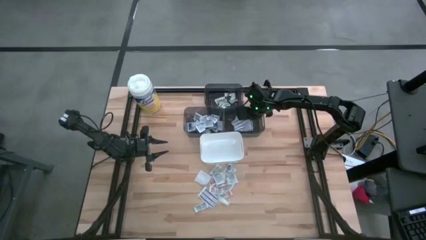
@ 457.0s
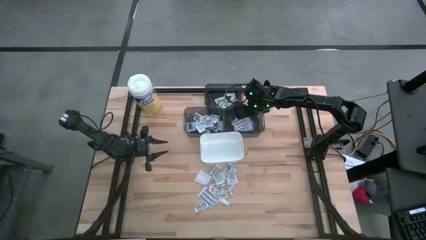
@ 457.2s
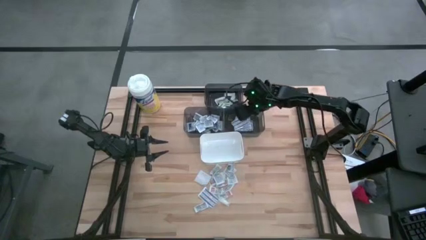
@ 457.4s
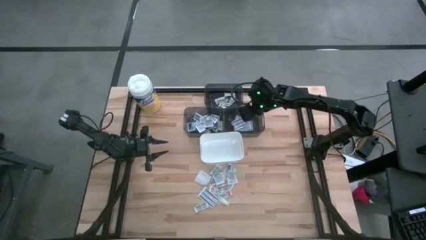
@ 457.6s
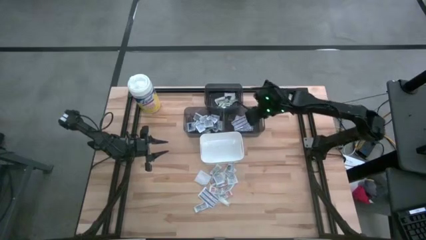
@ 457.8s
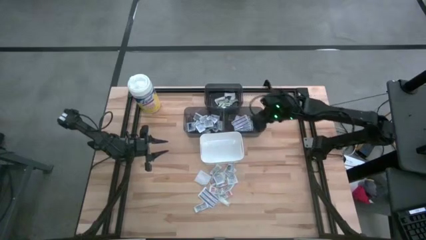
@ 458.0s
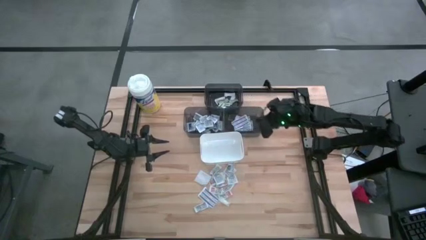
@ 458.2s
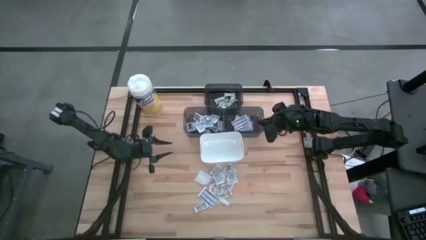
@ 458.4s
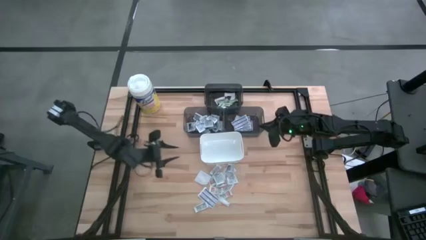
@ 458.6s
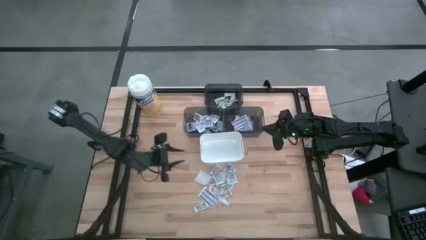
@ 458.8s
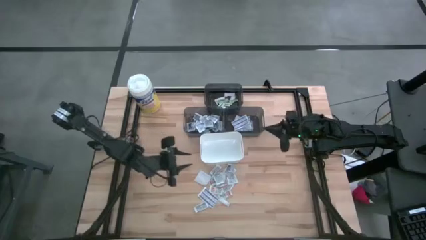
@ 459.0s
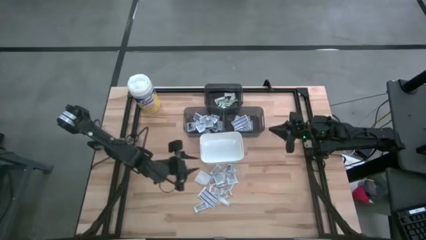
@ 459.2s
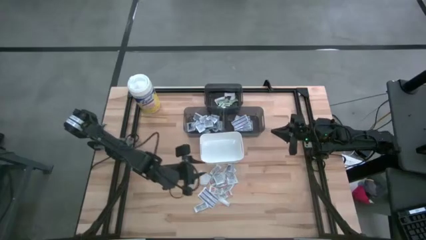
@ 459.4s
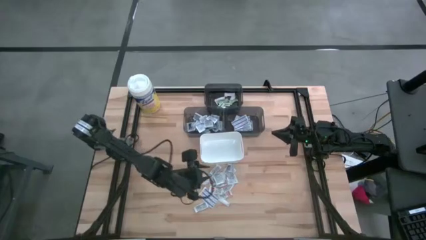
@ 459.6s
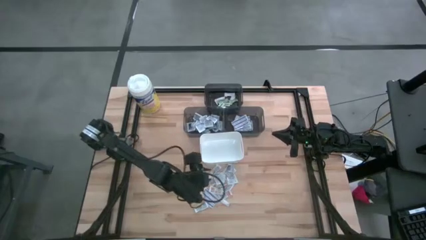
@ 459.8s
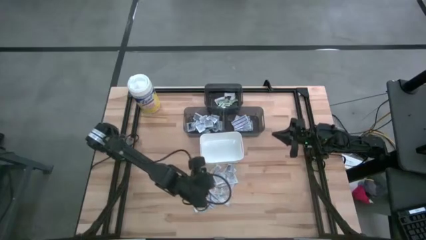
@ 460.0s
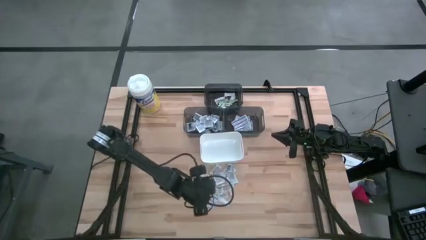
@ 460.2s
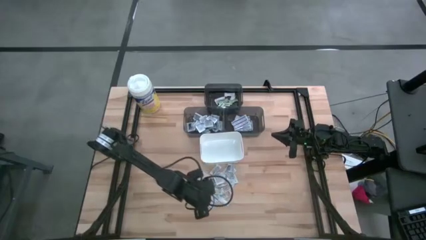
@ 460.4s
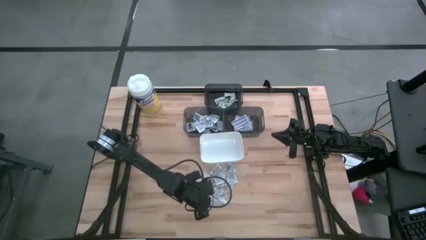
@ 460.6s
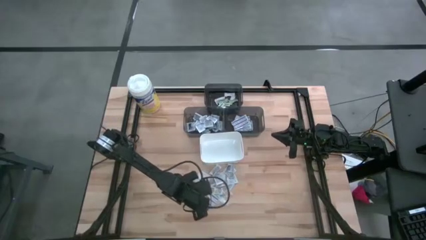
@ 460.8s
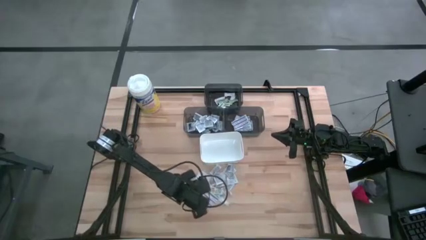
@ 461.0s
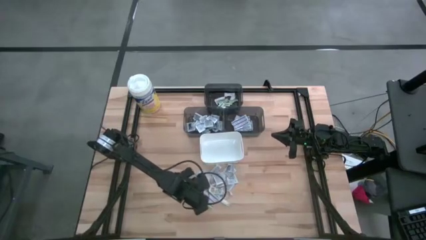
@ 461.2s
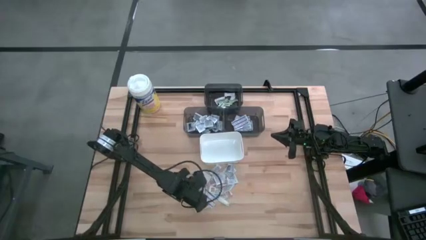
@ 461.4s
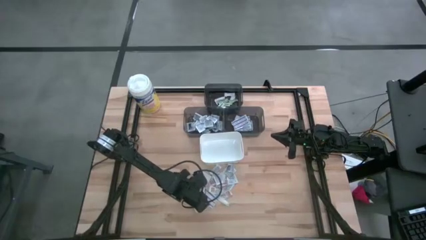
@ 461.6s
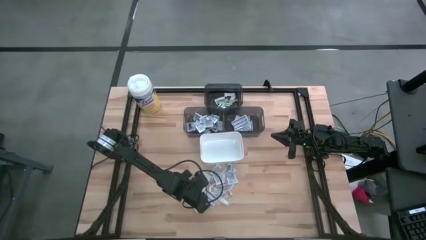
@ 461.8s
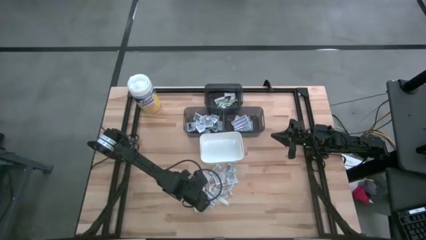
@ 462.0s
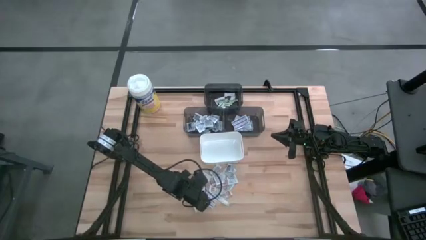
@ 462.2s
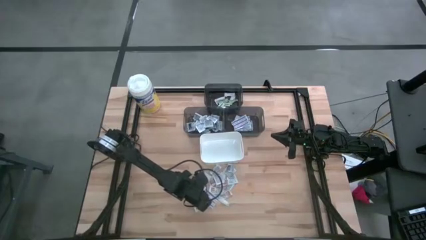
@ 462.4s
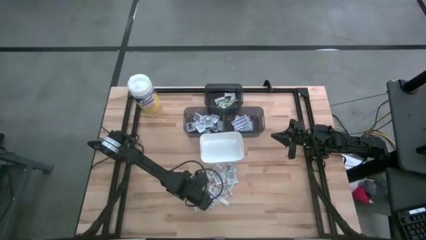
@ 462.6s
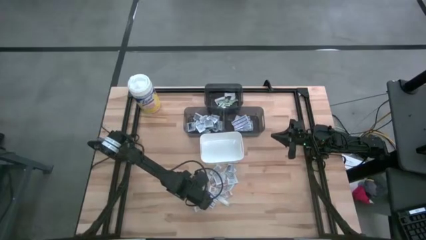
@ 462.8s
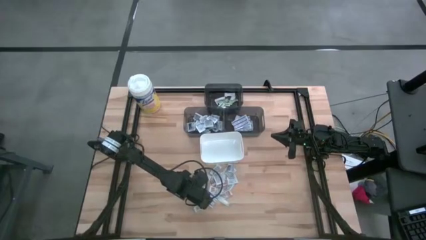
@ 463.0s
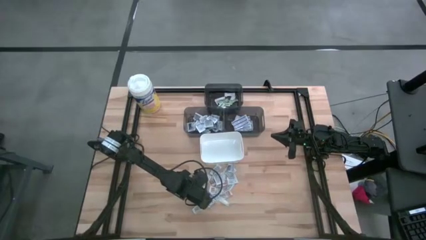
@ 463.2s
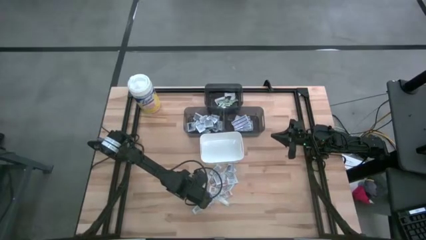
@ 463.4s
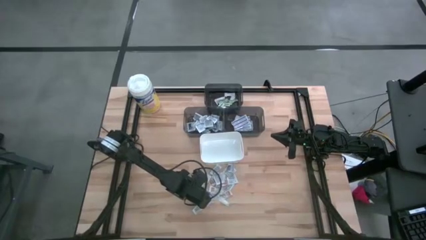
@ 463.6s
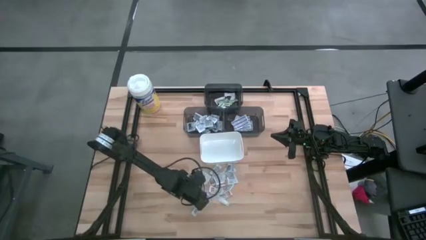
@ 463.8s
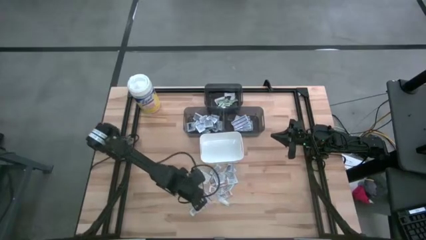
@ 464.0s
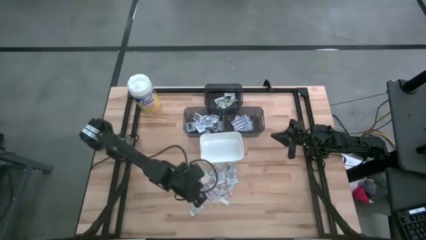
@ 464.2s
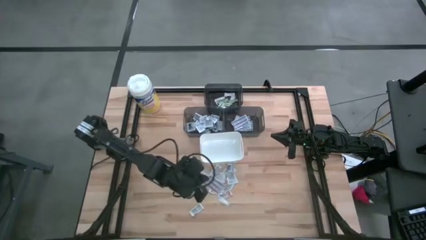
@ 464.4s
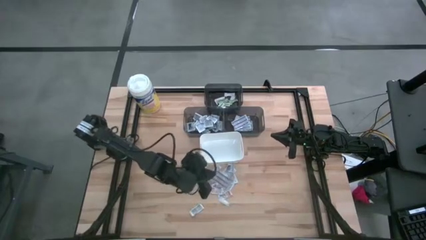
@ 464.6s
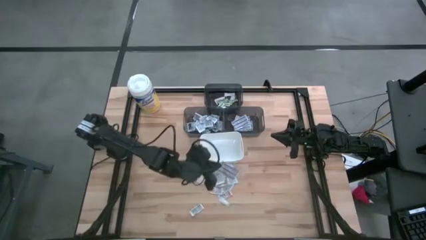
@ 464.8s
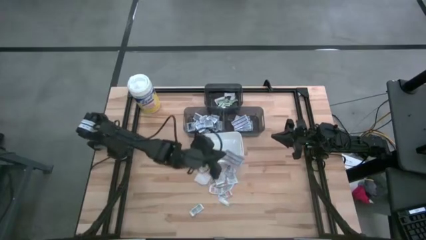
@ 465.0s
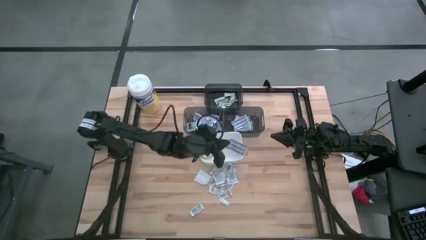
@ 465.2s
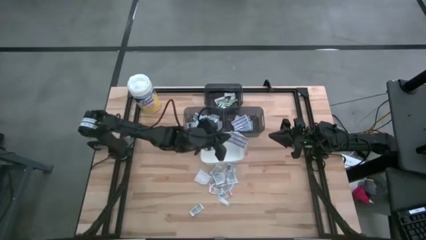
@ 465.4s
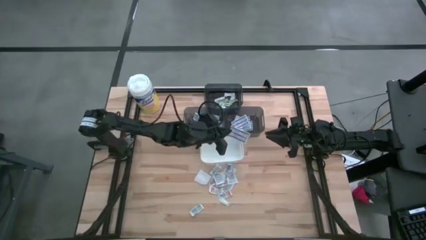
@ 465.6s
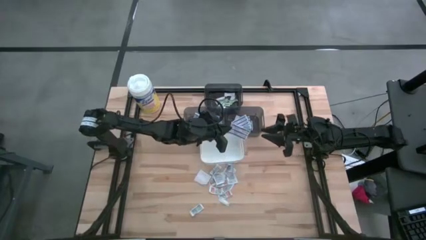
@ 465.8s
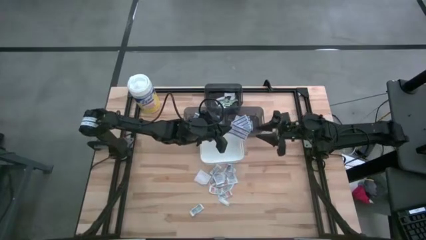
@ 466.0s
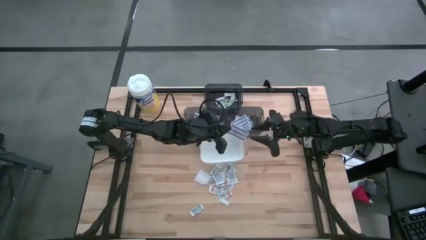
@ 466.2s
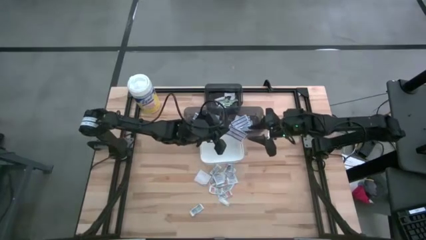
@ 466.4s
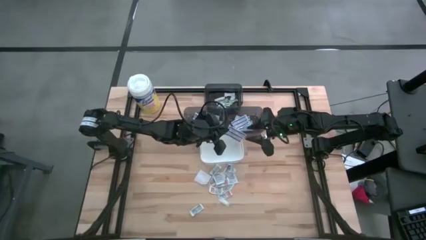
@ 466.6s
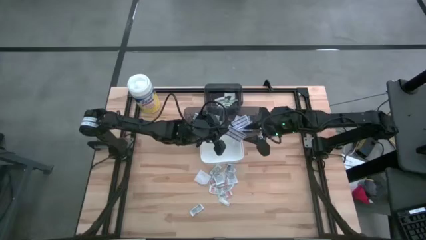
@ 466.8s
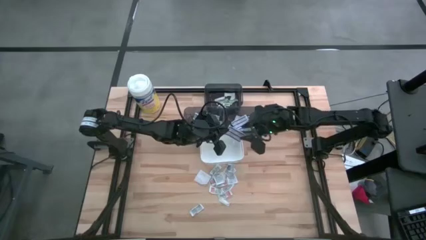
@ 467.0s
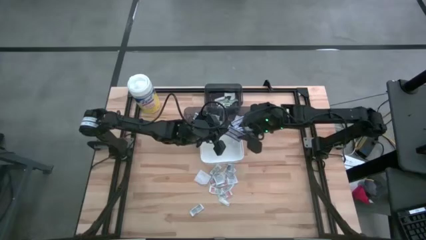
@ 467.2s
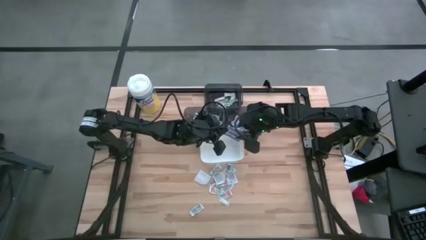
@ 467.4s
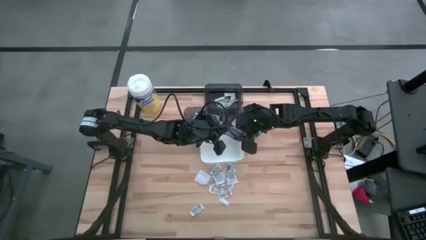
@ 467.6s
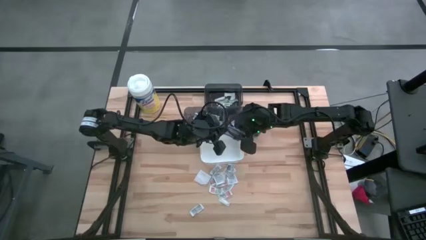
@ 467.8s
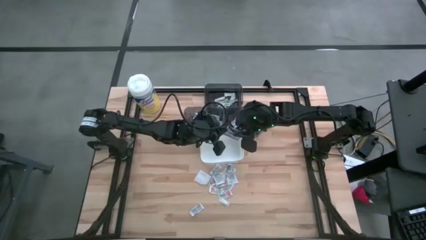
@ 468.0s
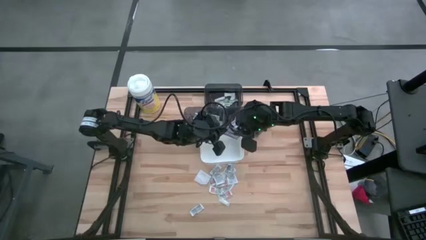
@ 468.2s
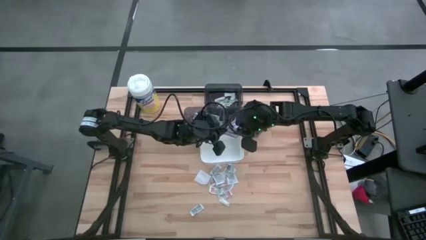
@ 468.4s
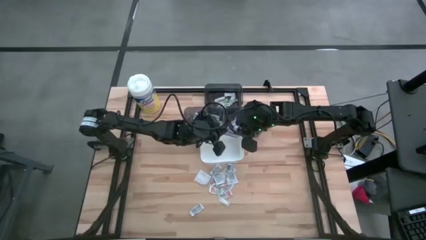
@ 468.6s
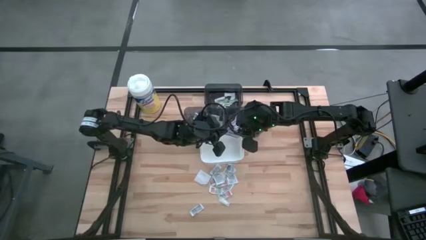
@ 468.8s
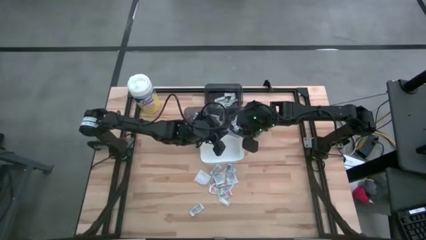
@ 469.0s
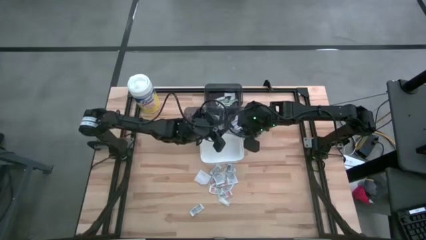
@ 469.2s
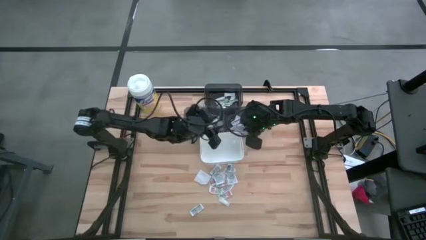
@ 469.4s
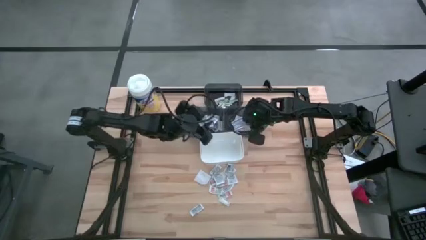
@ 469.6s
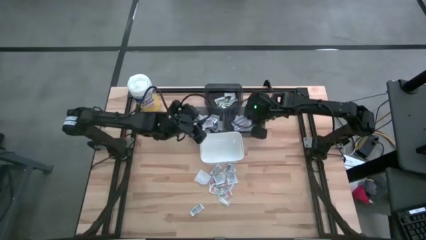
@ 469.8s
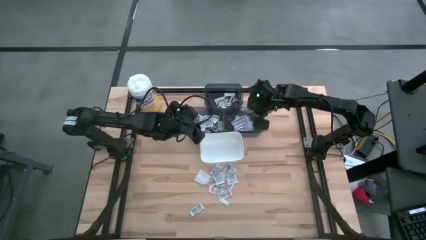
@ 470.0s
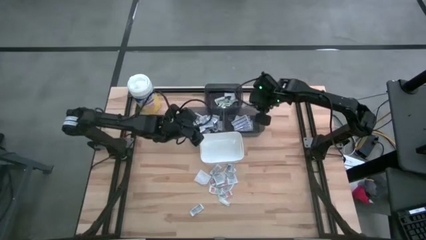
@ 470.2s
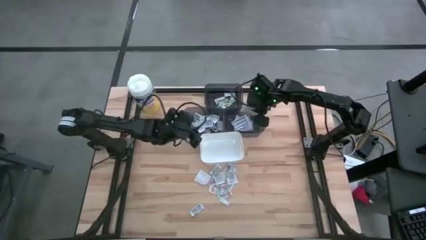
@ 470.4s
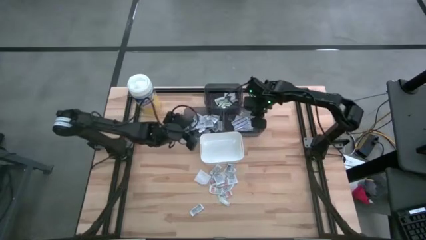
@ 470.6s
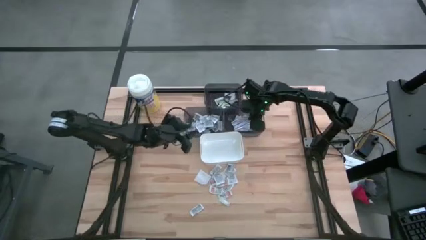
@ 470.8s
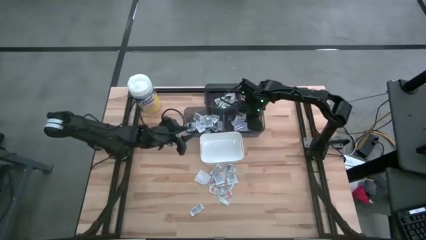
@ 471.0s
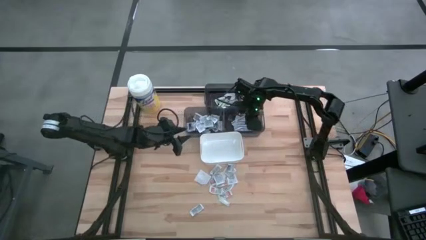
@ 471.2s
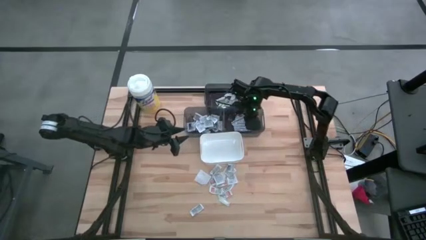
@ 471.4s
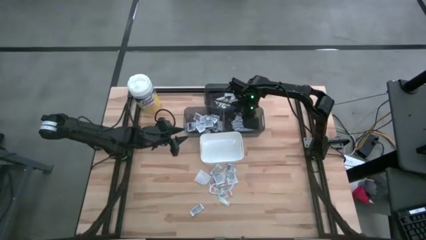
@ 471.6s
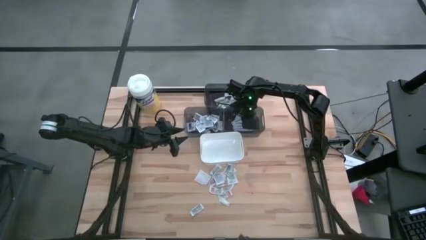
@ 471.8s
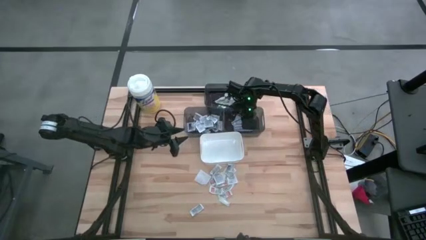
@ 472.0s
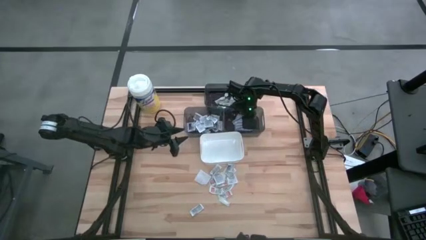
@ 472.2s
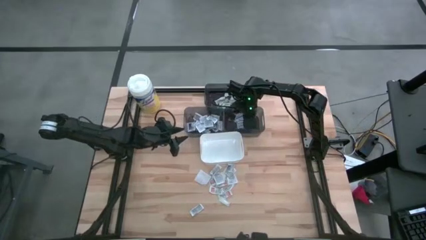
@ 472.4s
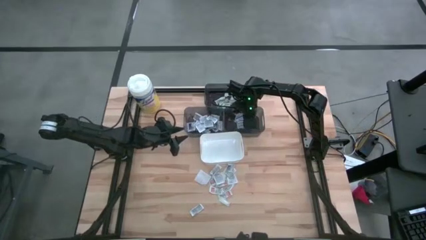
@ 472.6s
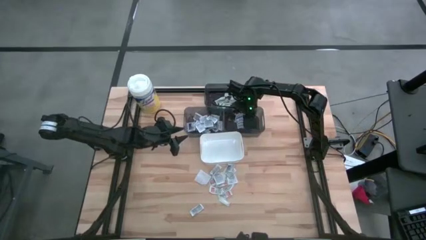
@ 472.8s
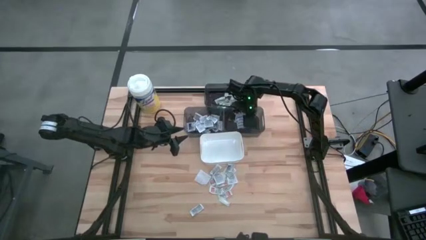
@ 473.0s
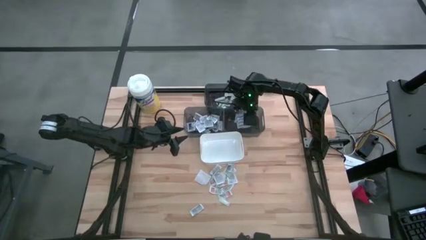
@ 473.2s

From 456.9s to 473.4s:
Task: Pick & Place First Aid Supplies
Put the blue bandage into the right black bin
